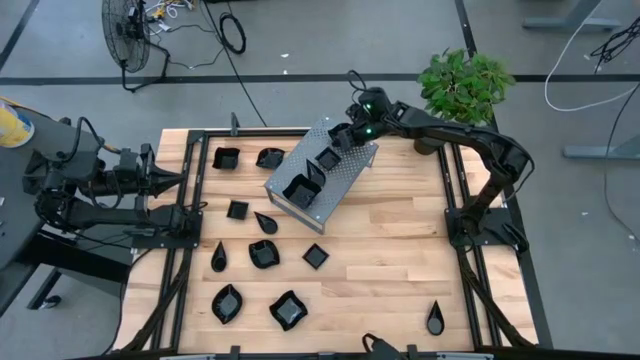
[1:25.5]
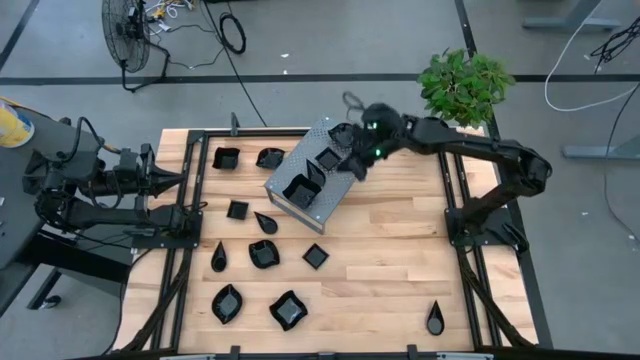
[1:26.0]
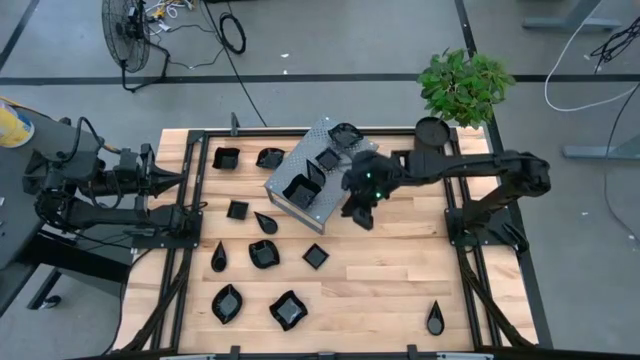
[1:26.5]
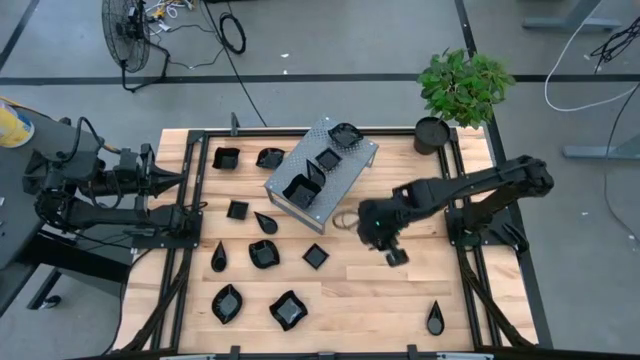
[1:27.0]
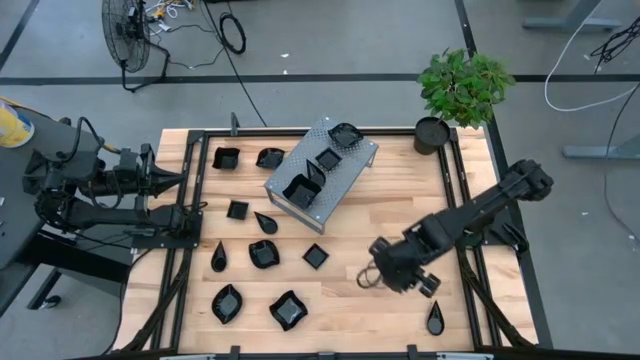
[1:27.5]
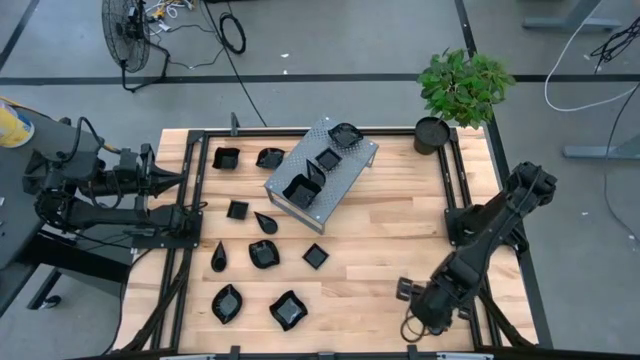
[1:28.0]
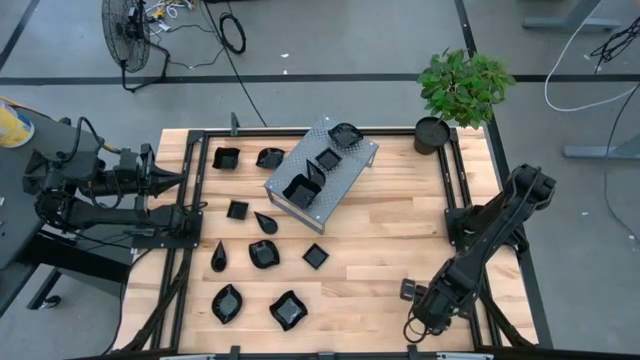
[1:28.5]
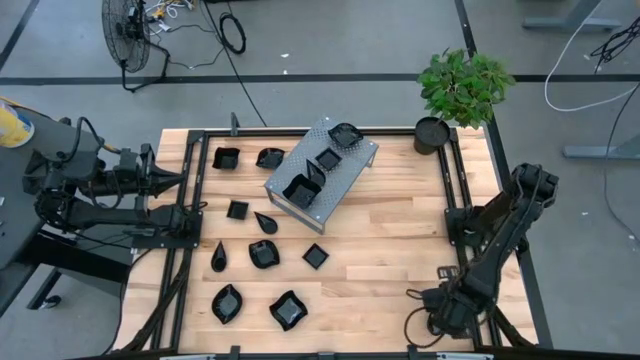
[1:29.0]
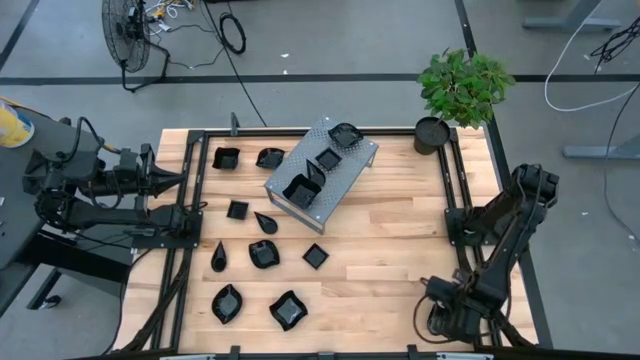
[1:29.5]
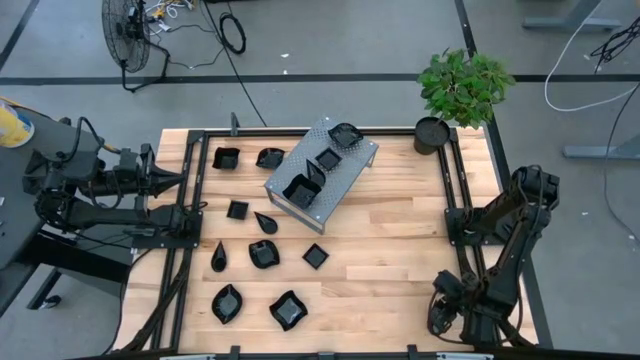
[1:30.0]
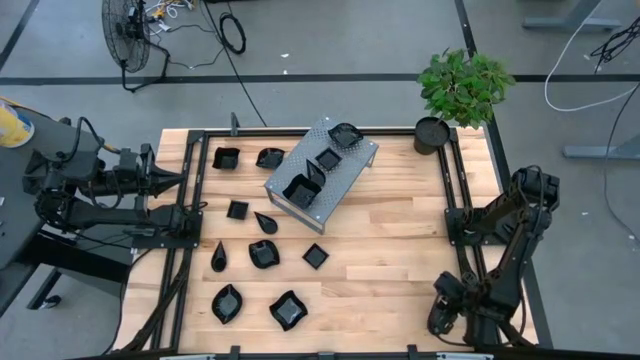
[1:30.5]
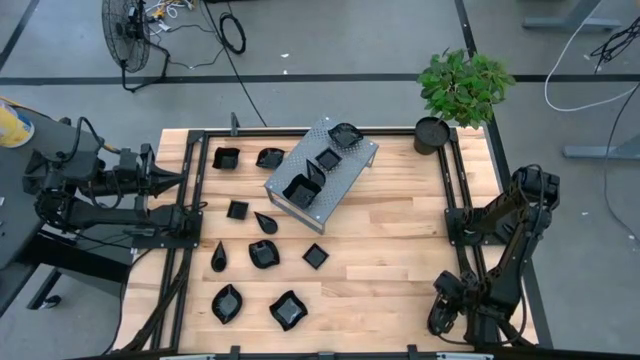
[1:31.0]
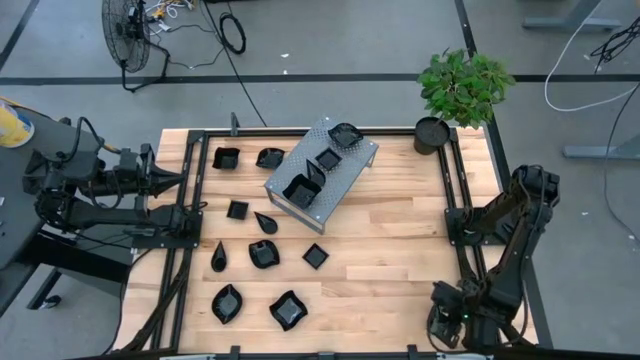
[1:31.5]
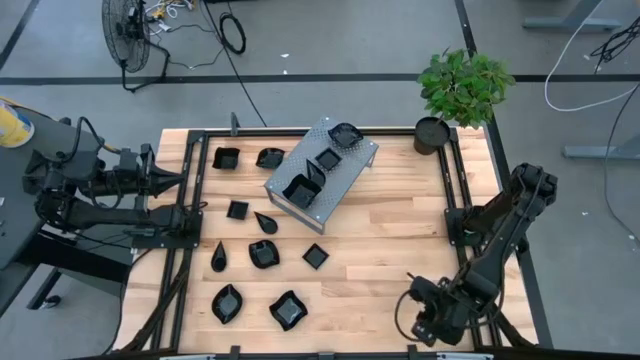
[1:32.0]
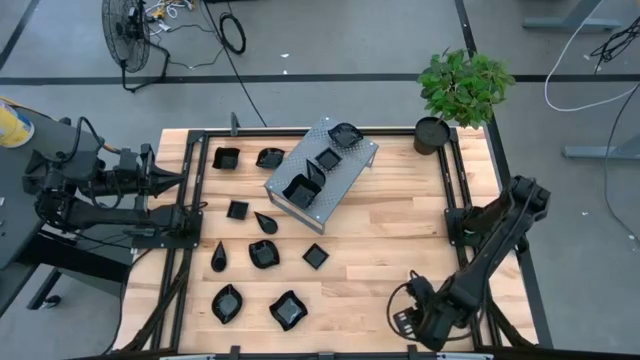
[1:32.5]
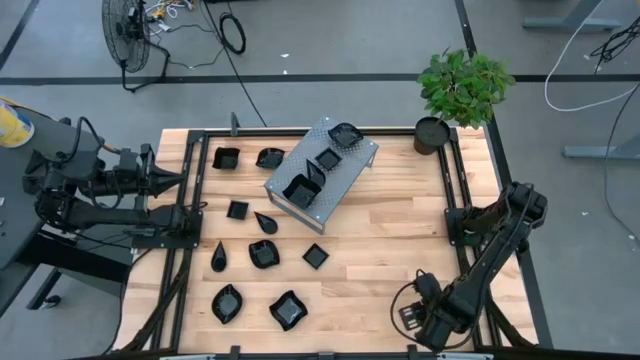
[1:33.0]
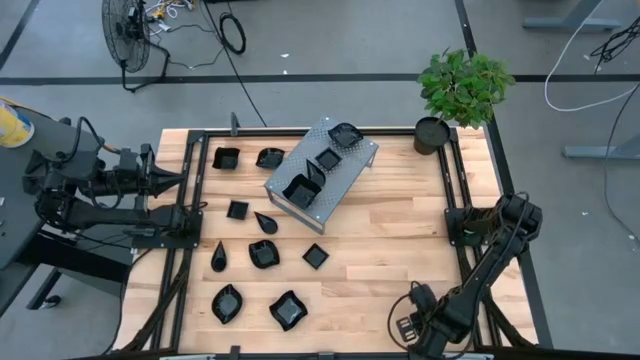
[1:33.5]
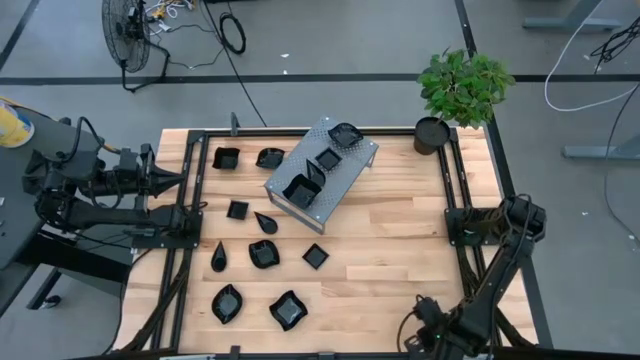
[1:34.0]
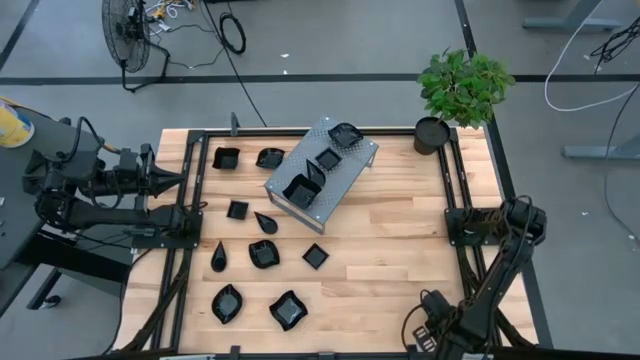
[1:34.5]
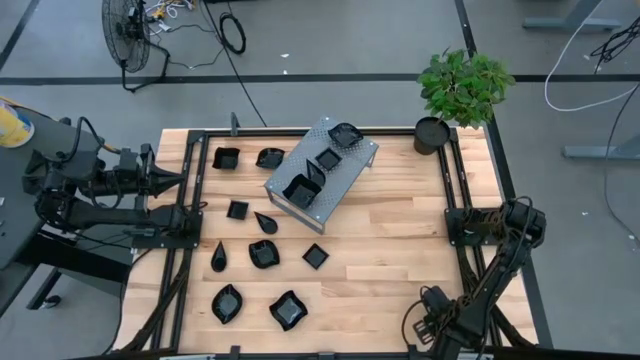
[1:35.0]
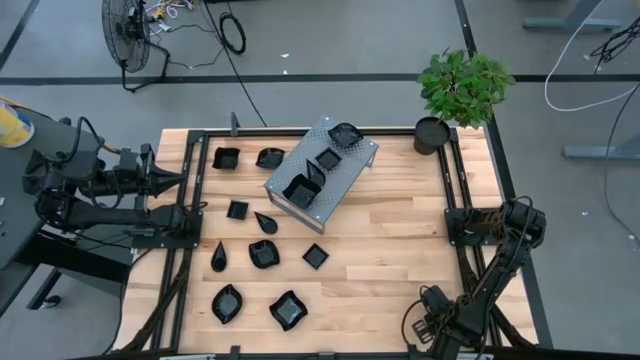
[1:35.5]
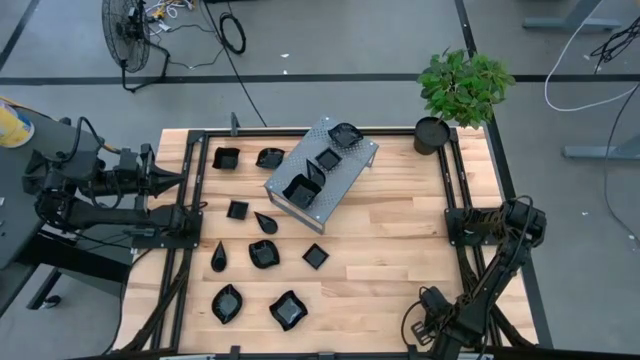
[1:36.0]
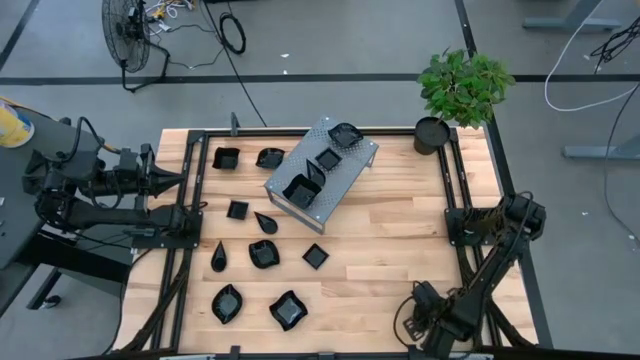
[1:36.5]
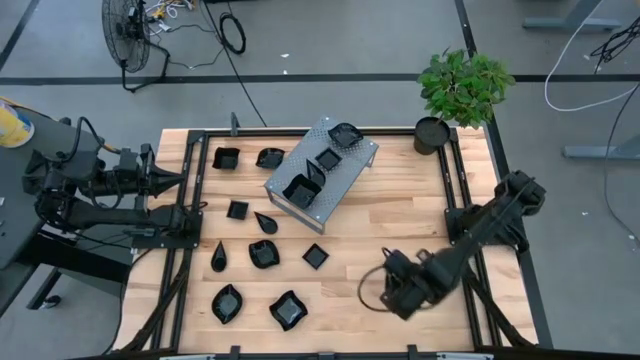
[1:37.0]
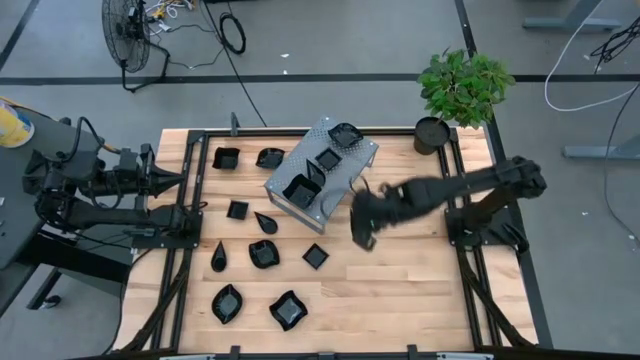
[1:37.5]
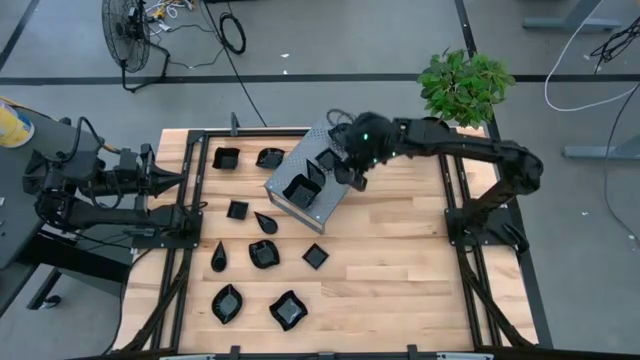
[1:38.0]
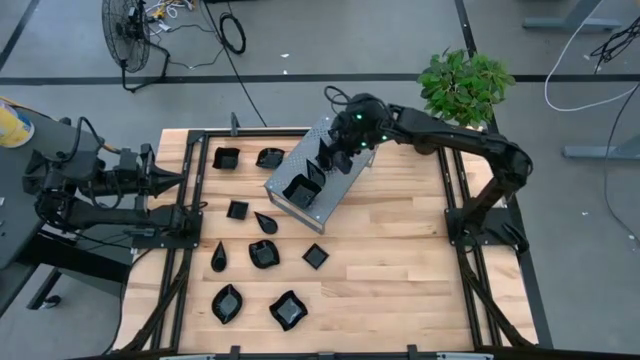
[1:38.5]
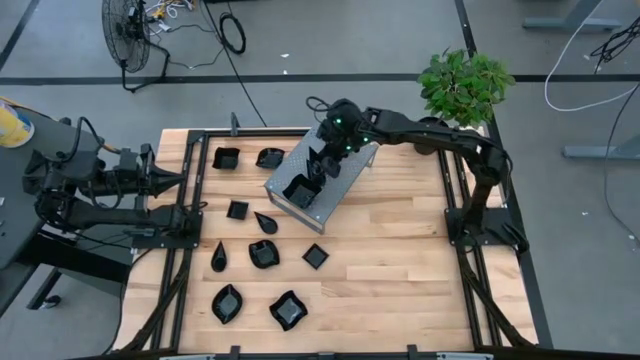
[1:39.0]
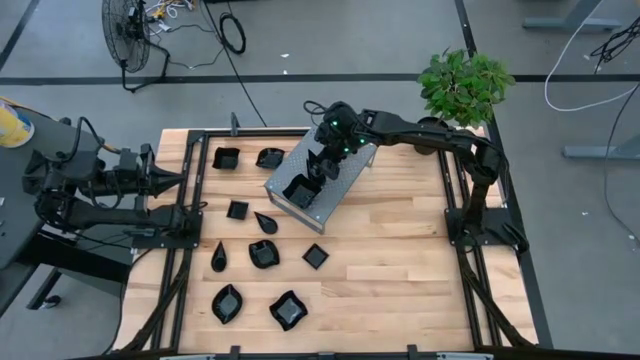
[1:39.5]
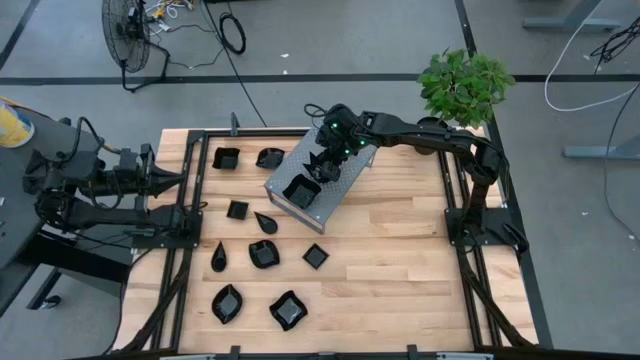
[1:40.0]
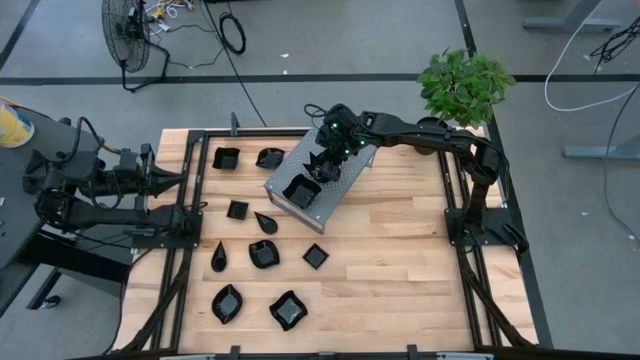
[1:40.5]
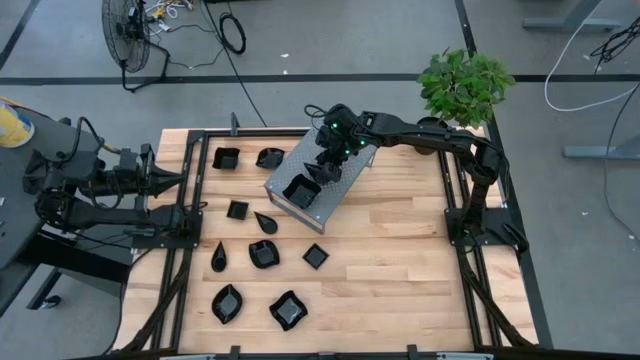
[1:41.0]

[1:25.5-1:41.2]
Task: Pick & Place Mini shaped plates
Stack the black leaf shaped plate on top of the black leaf shaped plate on the shelf

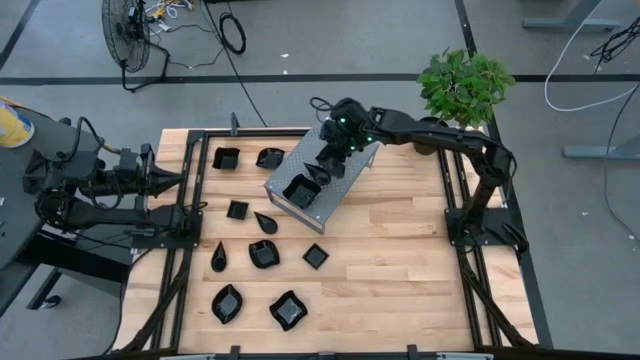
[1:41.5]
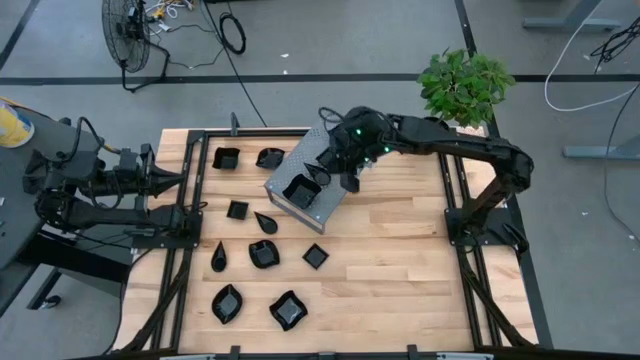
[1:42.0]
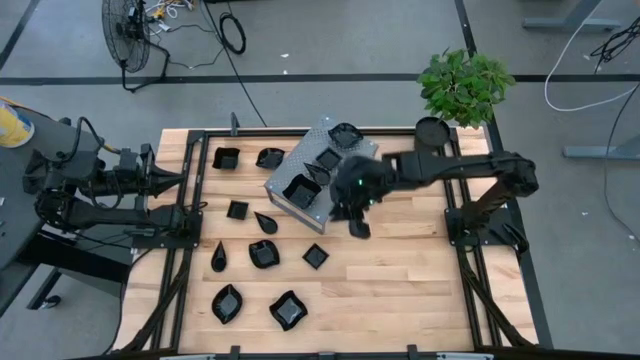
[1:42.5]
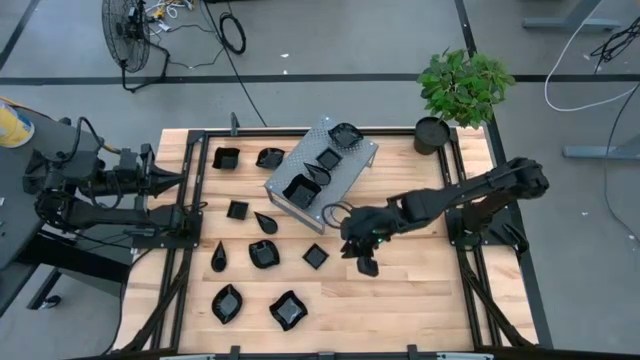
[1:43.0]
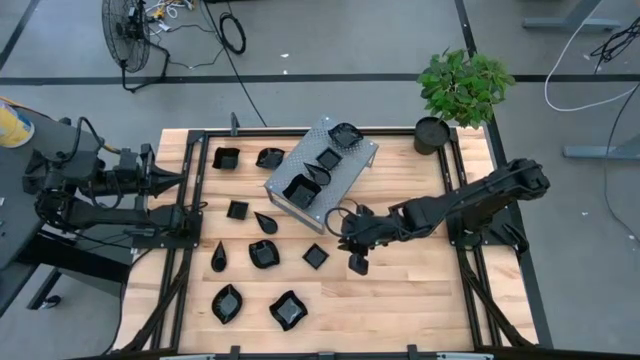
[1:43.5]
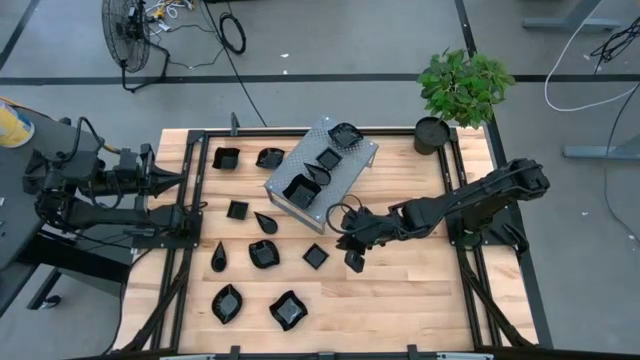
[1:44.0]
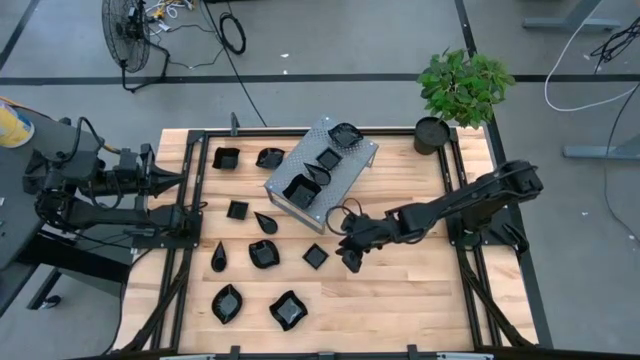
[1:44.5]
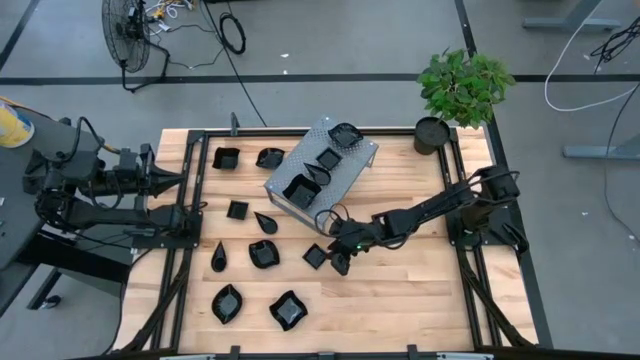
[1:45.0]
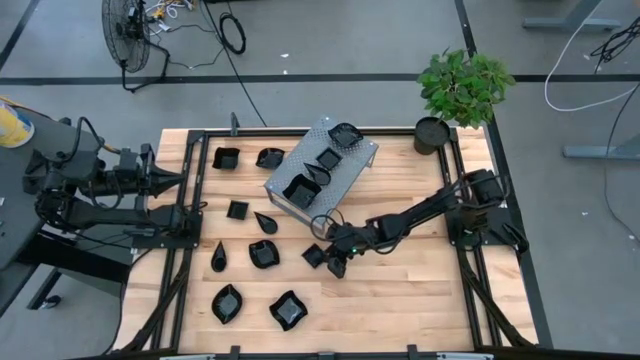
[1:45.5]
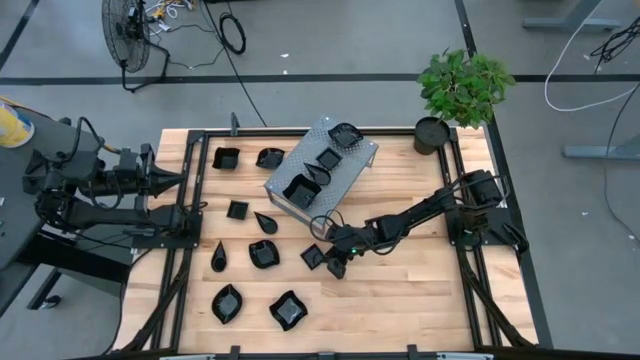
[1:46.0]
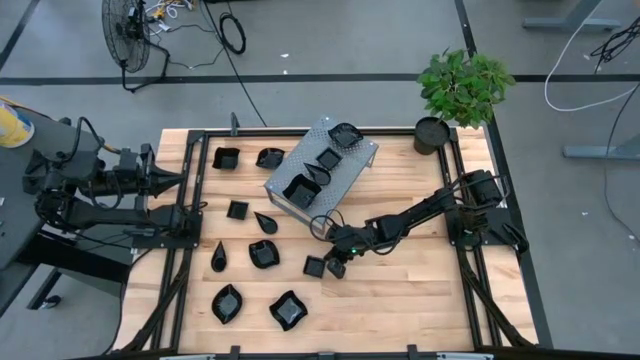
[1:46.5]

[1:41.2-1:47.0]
Stack the black square shape plate on top of the black square shape plate on the shelf
